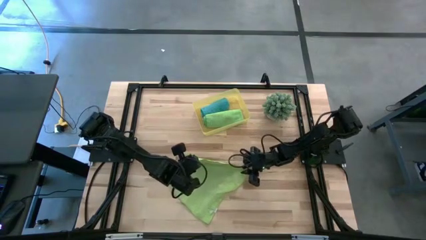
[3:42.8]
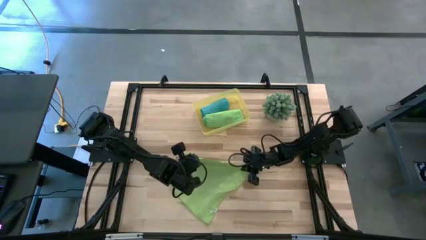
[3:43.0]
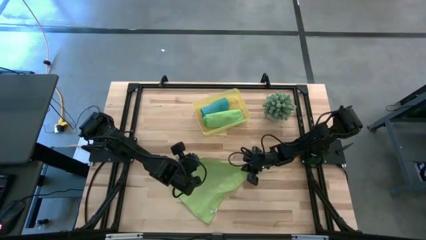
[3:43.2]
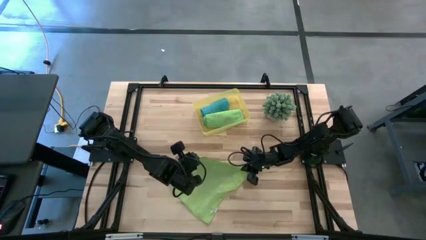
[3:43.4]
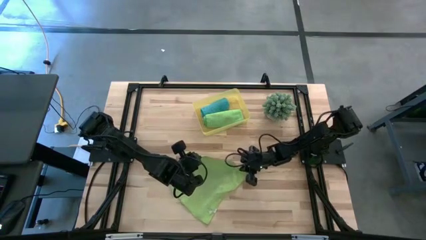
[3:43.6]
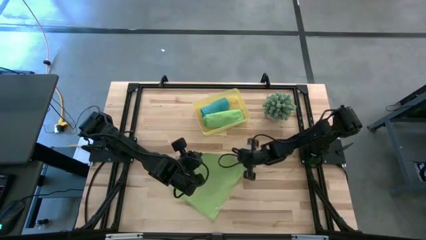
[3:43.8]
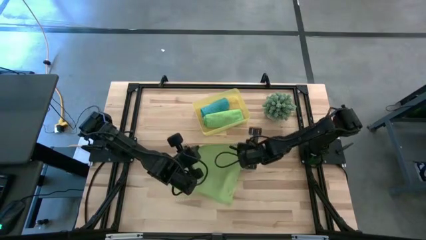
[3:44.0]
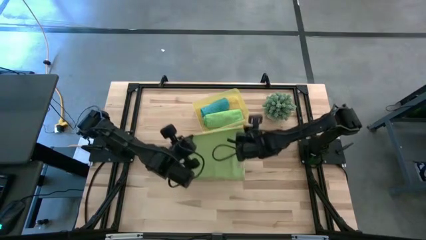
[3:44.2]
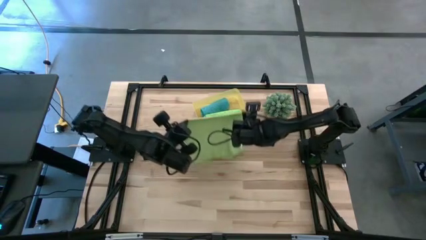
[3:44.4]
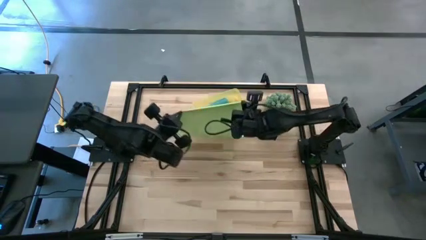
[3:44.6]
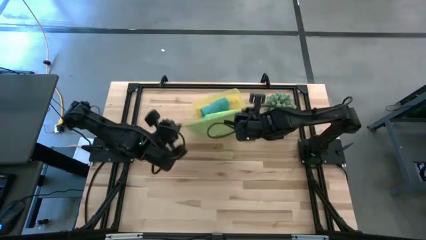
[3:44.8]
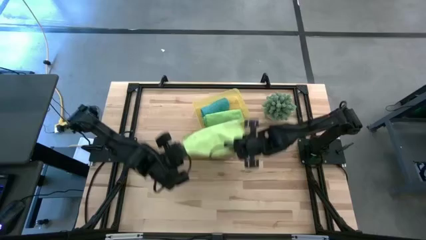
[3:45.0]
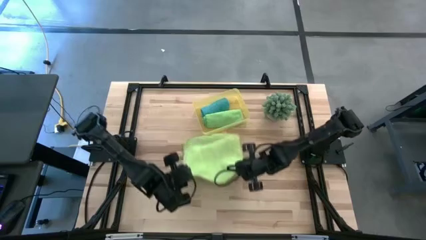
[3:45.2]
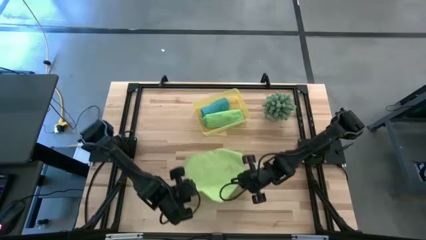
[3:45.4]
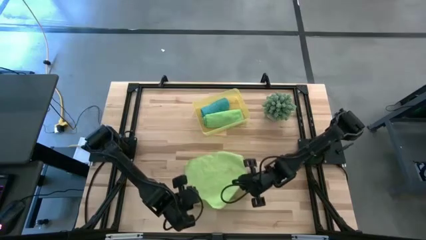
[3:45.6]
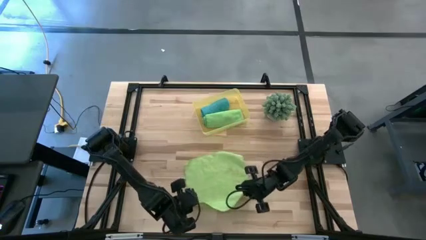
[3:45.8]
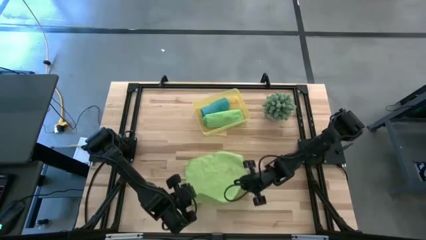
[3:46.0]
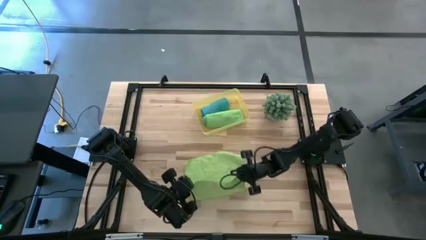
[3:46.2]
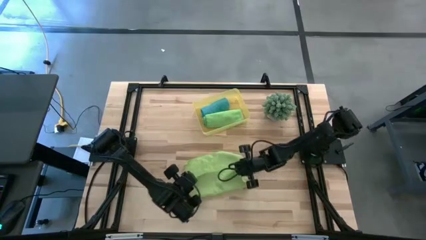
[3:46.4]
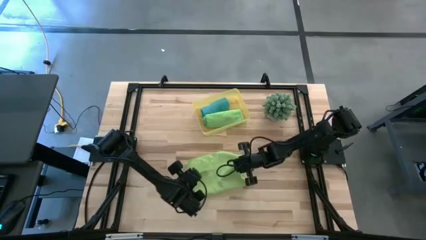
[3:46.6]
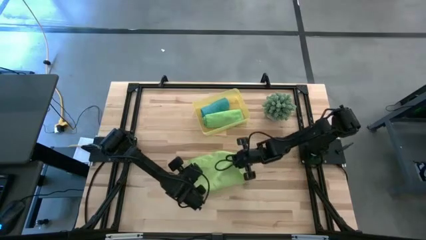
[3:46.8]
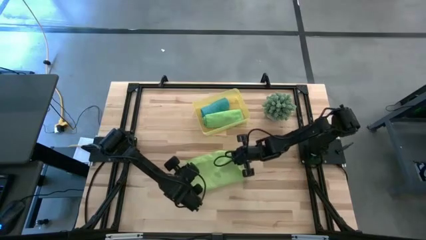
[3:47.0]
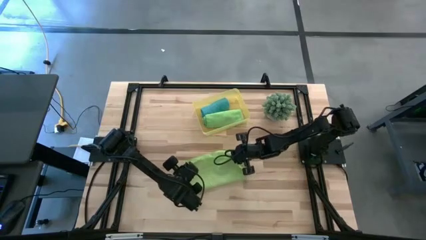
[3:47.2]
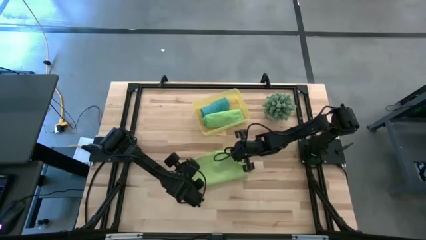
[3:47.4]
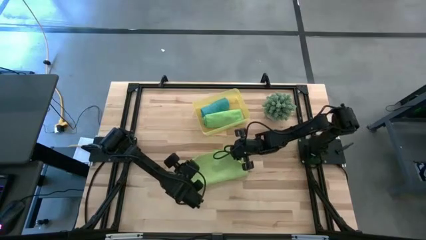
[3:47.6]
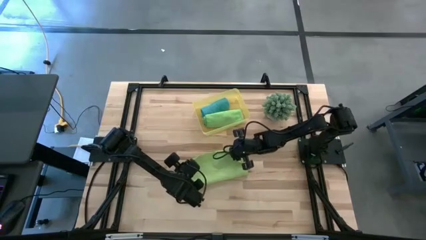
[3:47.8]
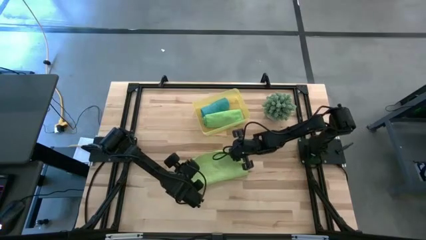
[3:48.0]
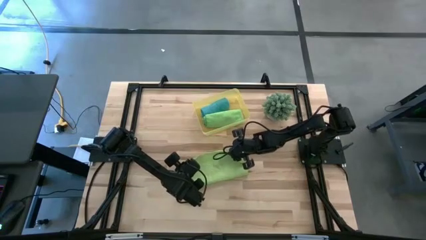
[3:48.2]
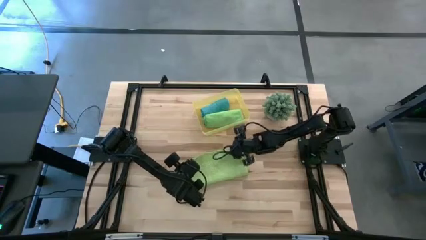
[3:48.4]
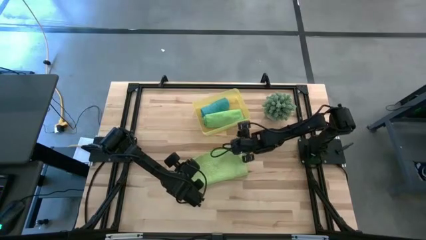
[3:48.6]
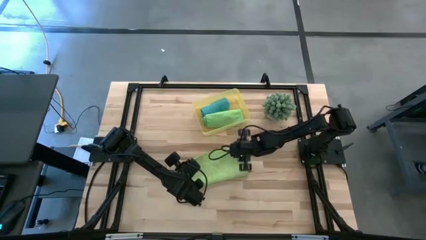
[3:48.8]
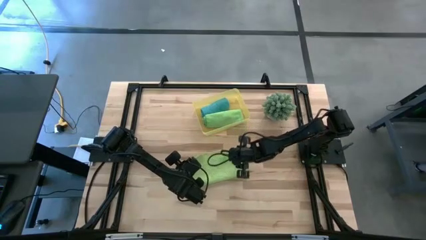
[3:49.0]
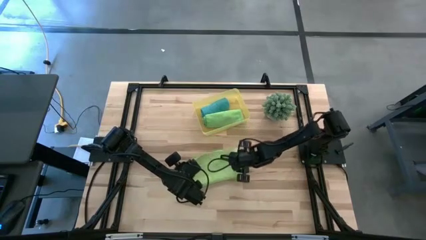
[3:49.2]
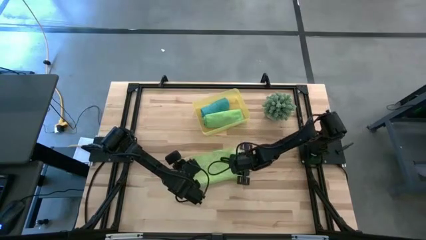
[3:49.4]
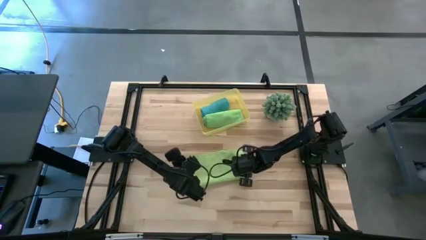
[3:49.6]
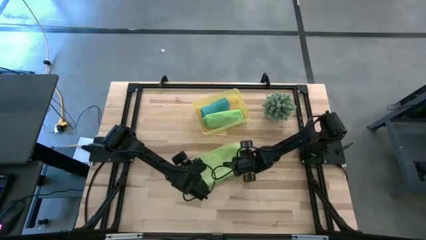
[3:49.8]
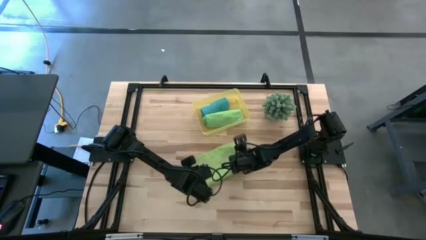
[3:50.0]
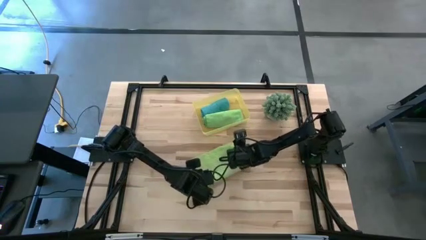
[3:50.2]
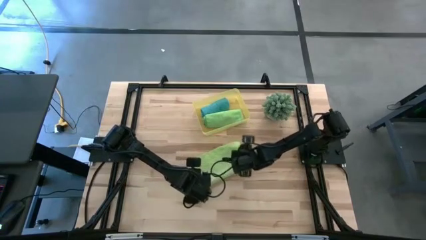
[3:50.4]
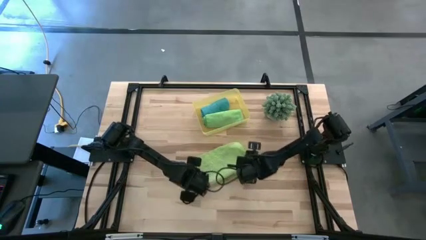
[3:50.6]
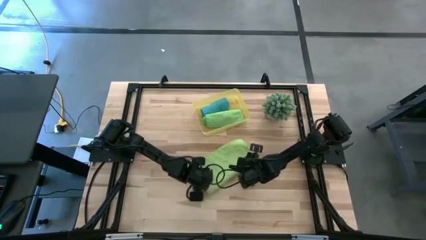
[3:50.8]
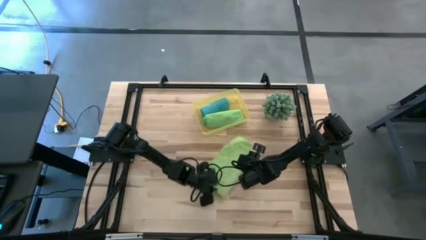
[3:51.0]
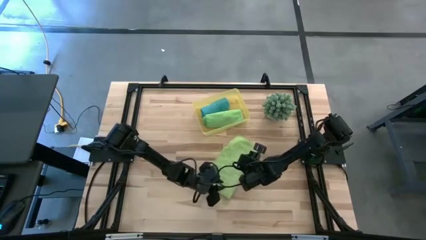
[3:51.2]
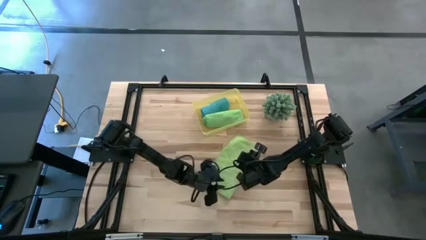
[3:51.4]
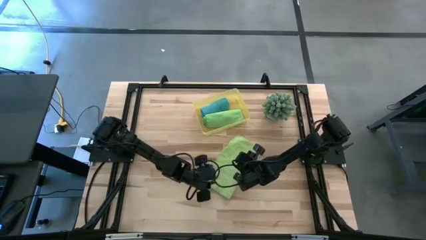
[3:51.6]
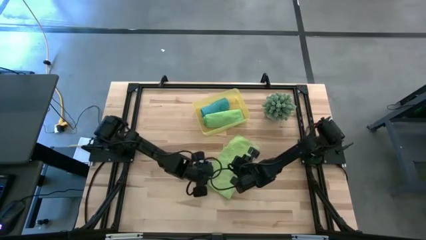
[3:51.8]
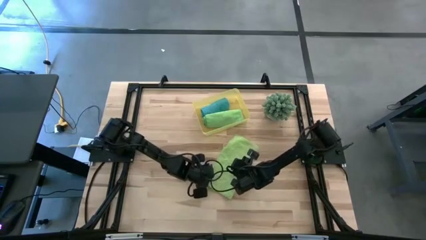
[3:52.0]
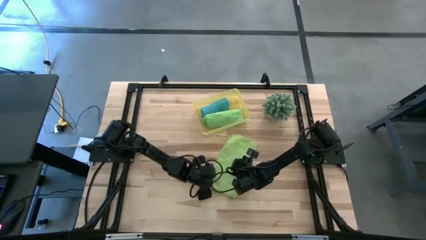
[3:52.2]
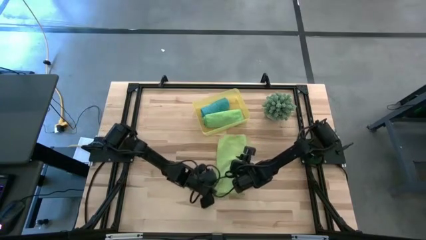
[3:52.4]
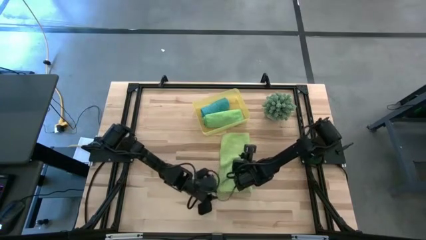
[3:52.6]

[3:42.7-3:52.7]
Task: Roll microfiber towels into tight, uniform cylinder then place into a basket
Fold the light green microfiber cloth

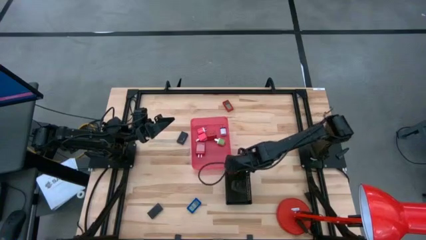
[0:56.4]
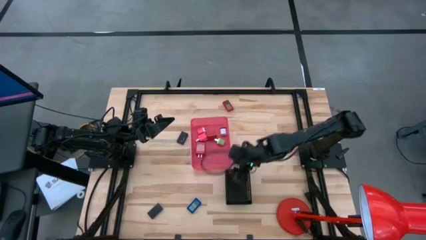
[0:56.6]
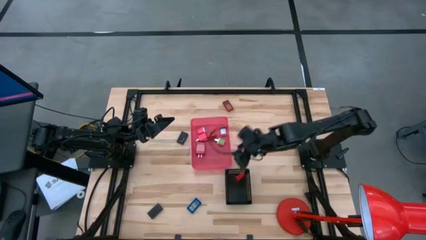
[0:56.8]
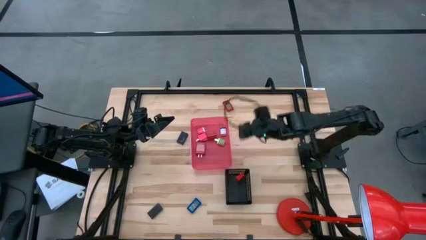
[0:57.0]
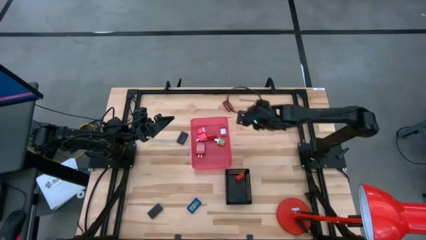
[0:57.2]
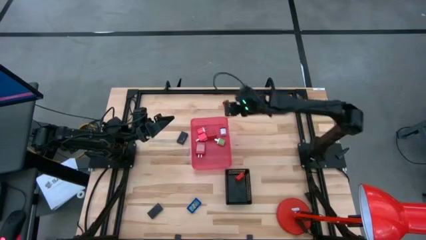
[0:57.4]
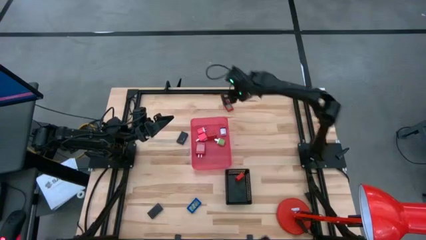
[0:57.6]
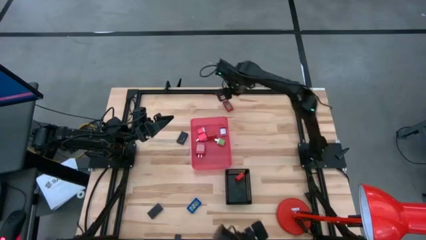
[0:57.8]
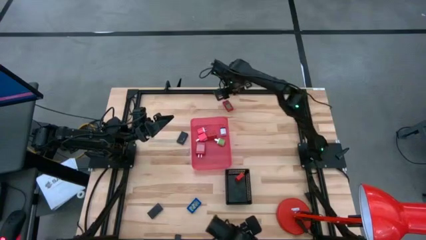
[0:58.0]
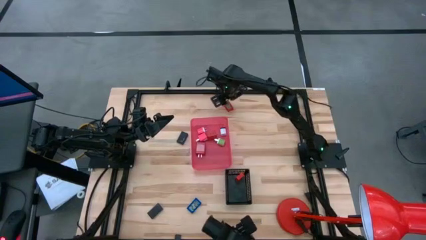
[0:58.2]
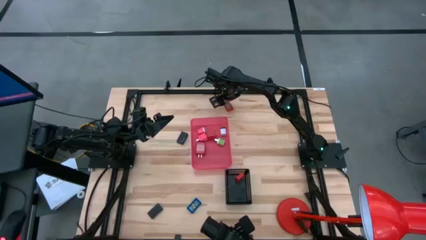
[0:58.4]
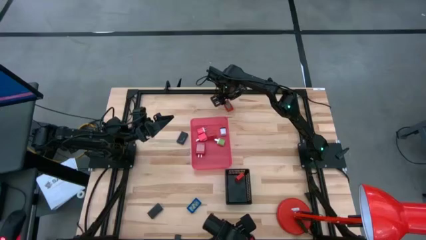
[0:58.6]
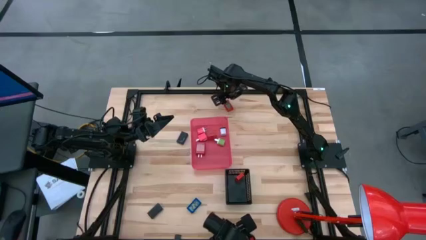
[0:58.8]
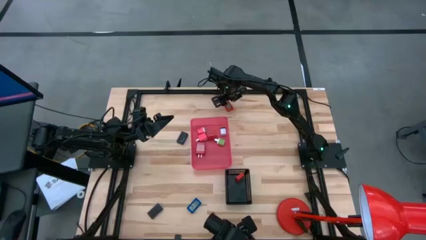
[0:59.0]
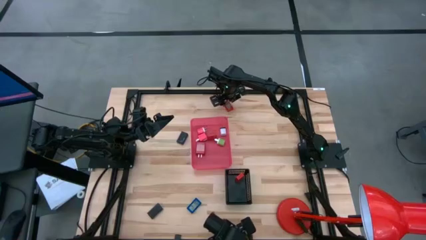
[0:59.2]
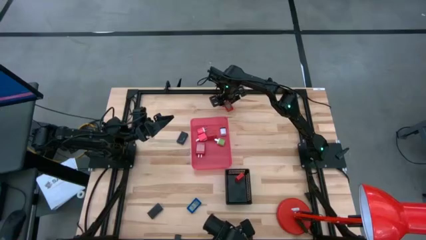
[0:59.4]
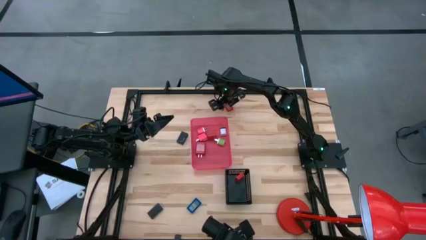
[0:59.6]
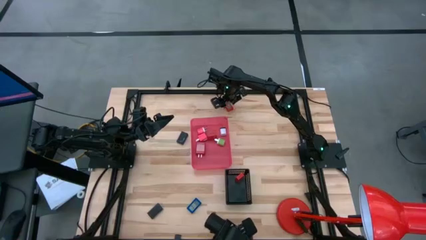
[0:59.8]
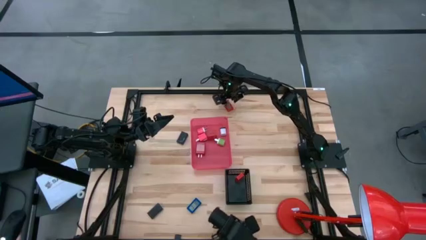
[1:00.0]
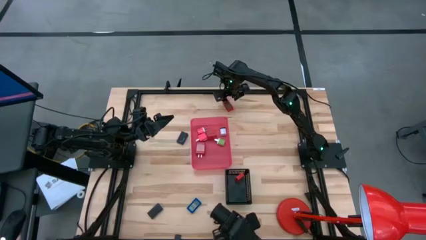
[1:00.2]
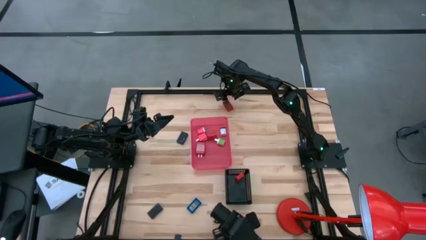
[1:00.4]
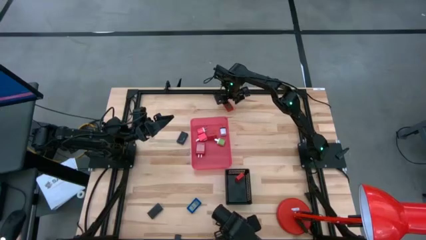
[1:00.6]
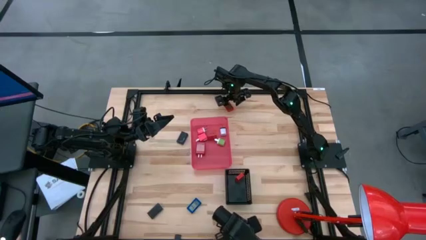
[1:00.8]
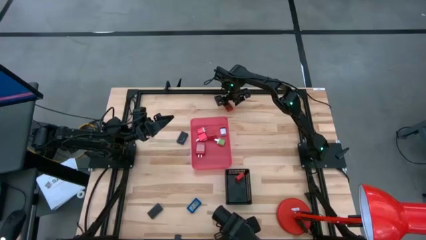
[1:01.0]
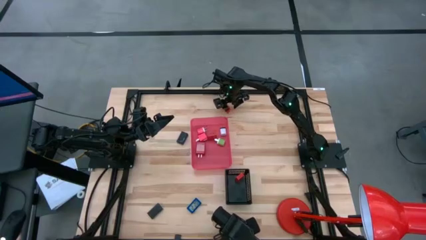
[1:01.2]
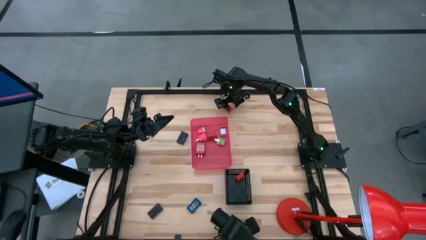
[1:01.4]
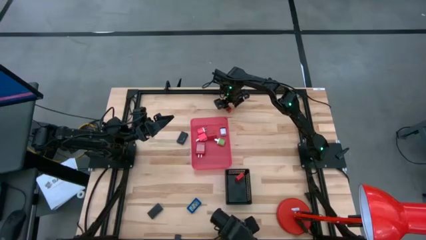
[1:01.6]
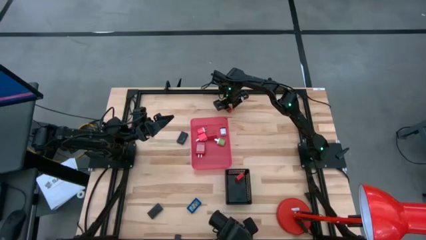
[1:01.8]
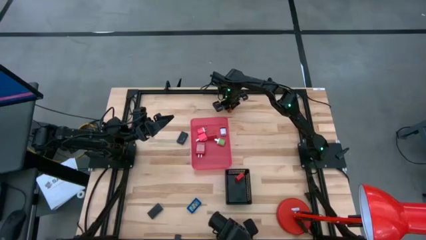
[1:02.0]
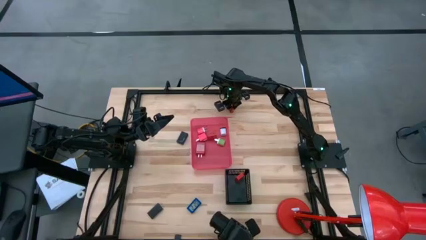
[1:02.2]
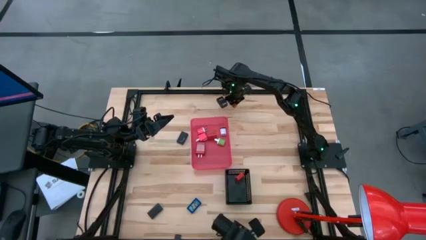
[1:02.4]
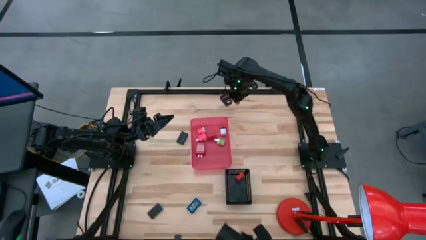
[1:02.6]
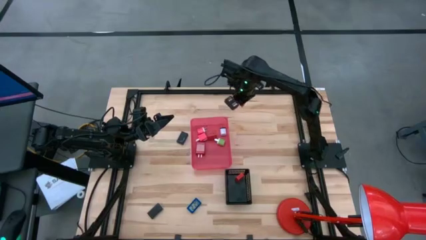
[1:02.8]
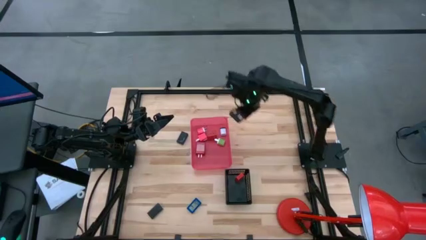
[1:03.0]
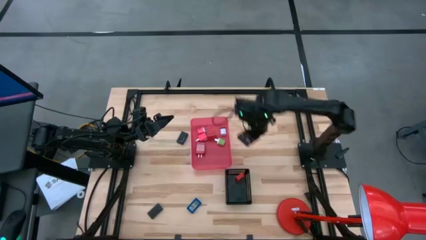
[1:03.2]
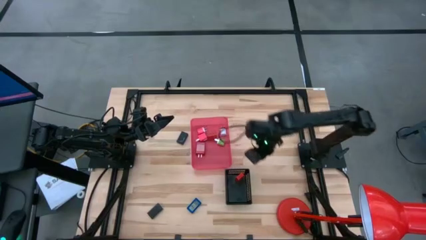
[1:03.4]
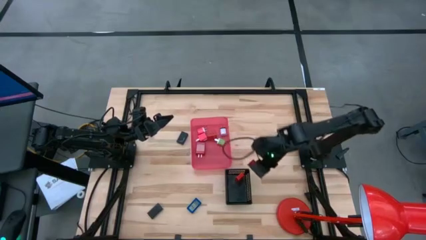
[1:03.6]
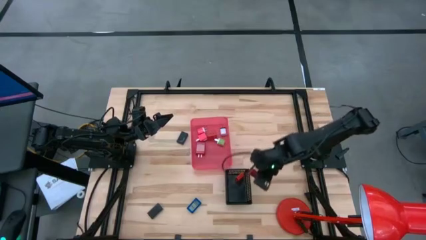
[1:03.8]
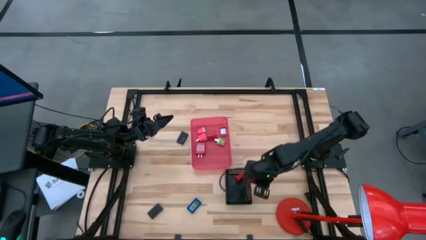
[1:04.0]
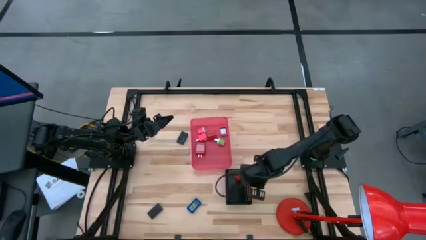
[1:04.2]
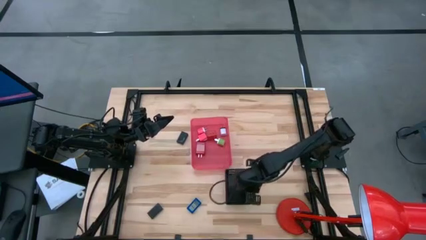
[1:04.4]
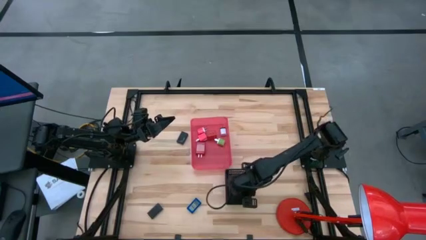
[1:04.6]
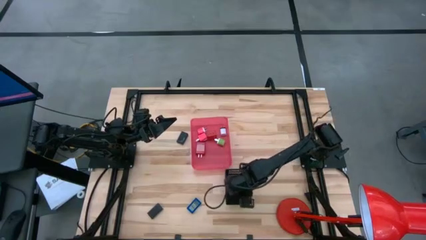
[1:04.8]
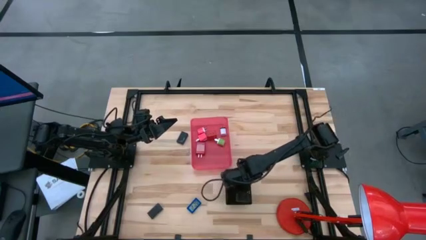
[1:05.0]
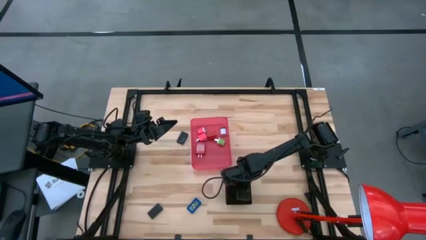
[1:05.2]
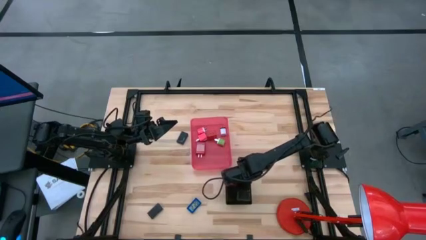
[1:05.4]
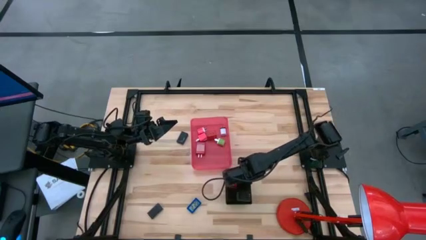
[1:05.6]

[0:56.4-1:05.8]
Task: Pick & Place Office items
Put the red digital timer into the black bin
